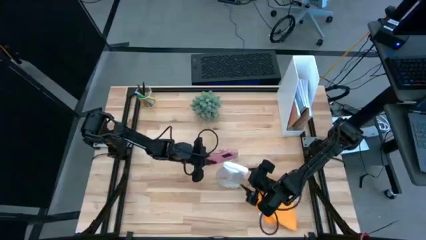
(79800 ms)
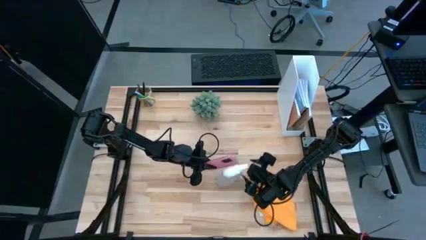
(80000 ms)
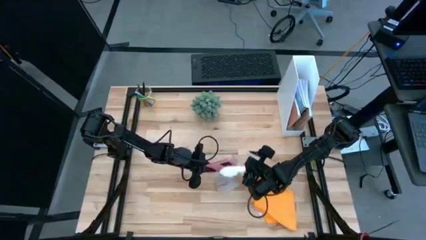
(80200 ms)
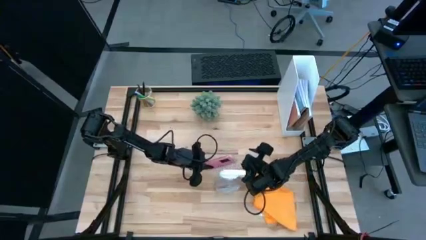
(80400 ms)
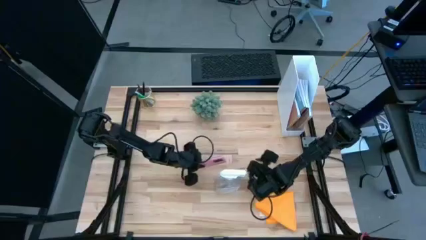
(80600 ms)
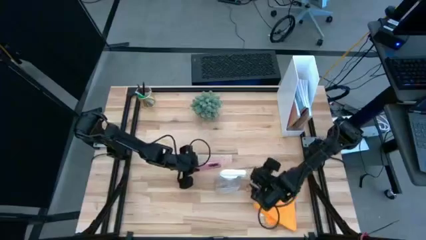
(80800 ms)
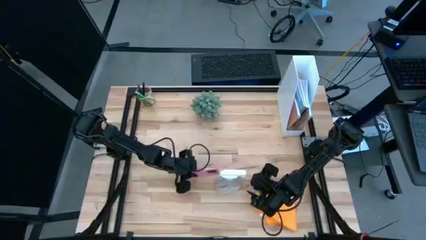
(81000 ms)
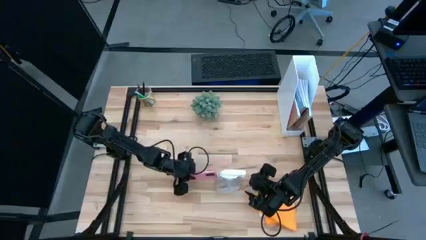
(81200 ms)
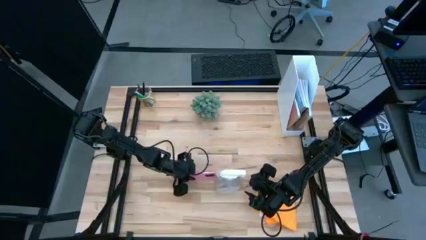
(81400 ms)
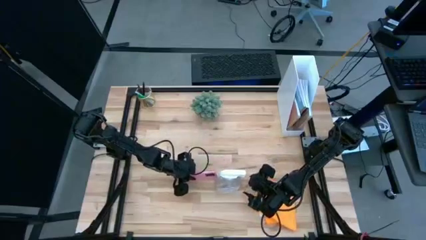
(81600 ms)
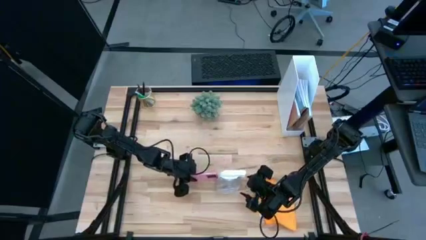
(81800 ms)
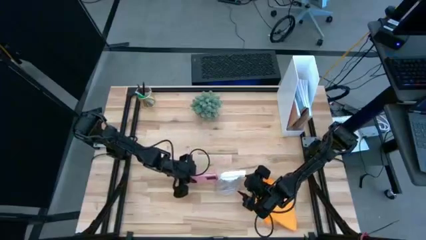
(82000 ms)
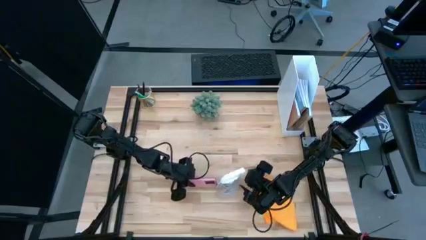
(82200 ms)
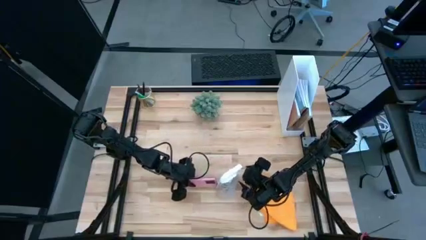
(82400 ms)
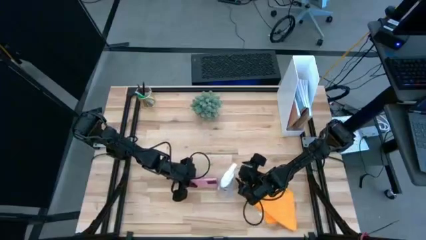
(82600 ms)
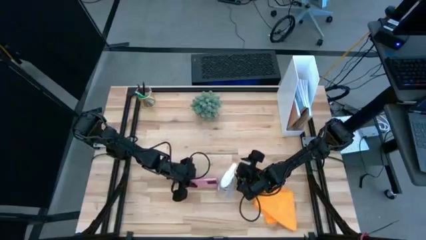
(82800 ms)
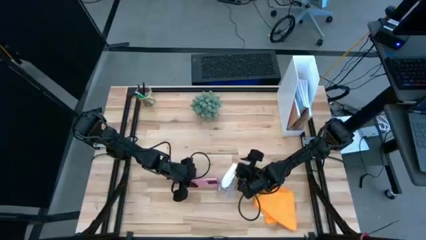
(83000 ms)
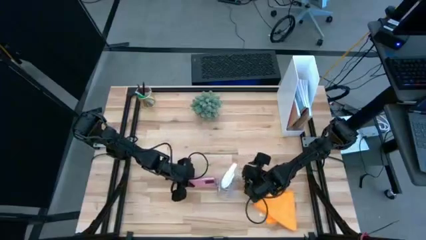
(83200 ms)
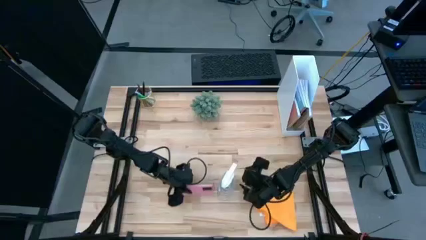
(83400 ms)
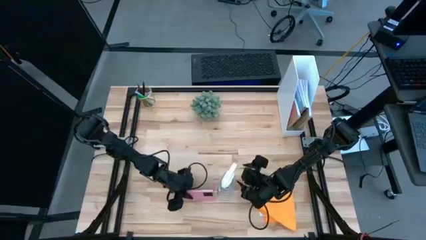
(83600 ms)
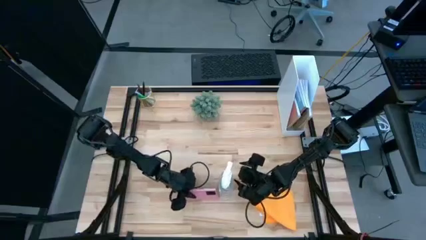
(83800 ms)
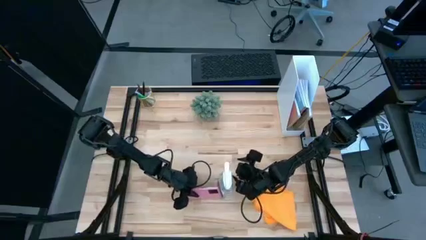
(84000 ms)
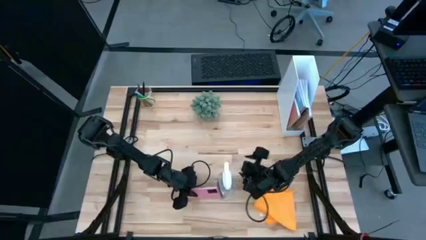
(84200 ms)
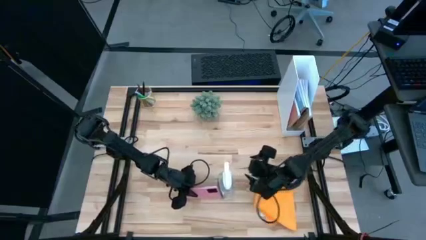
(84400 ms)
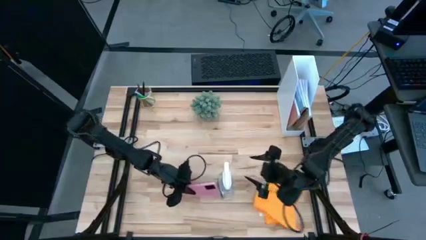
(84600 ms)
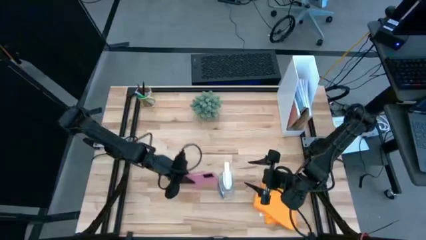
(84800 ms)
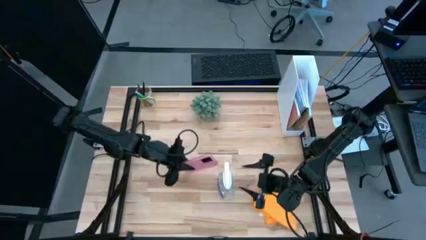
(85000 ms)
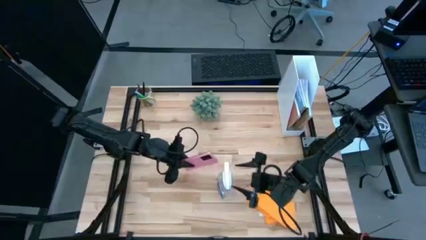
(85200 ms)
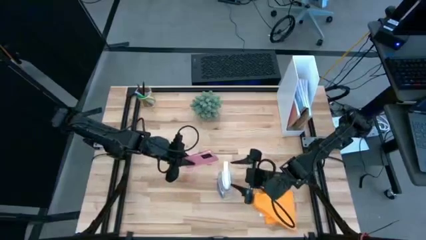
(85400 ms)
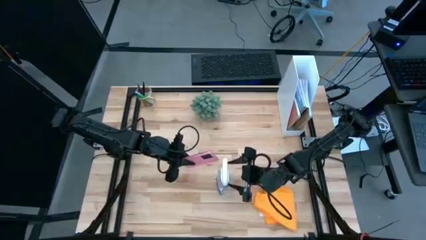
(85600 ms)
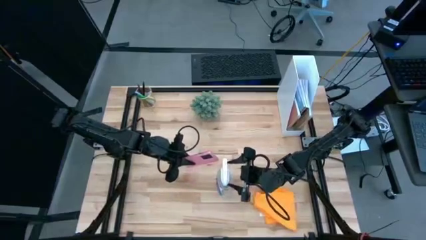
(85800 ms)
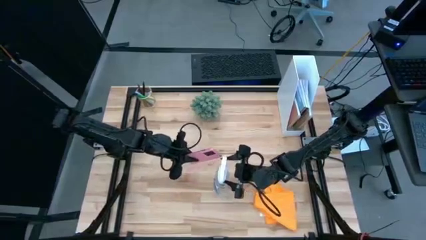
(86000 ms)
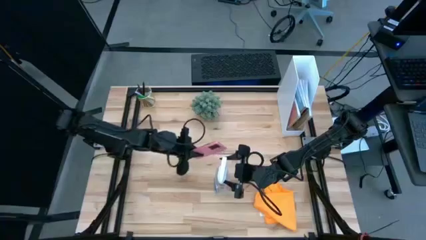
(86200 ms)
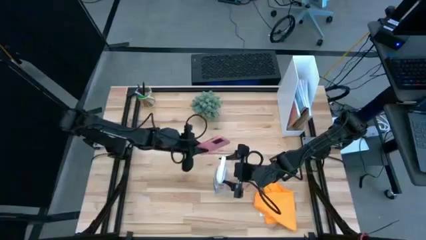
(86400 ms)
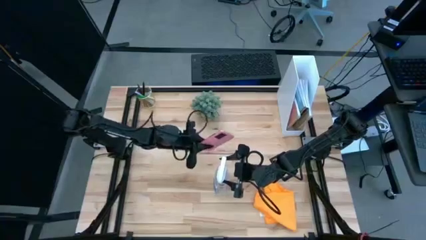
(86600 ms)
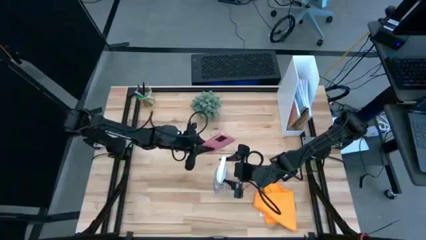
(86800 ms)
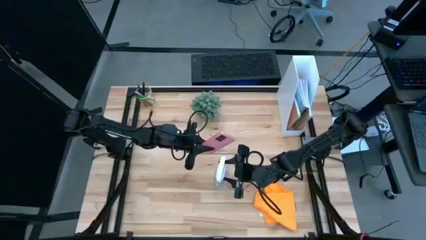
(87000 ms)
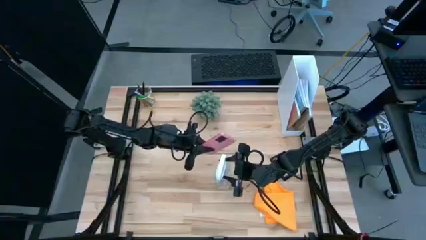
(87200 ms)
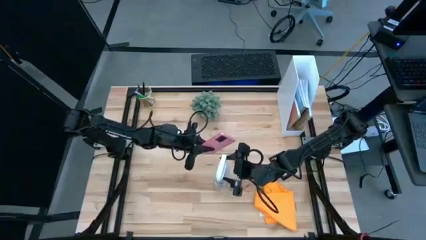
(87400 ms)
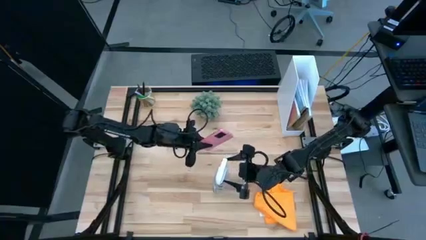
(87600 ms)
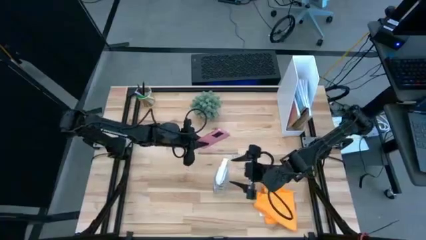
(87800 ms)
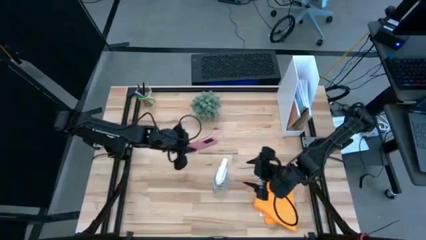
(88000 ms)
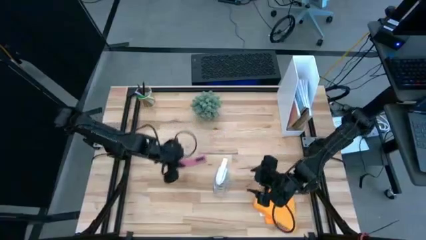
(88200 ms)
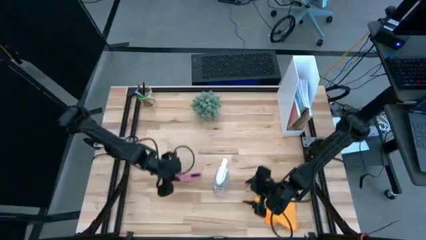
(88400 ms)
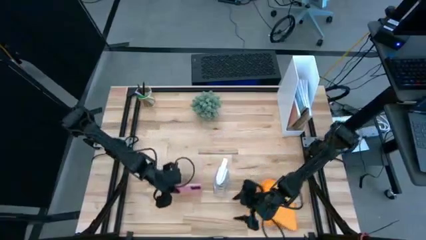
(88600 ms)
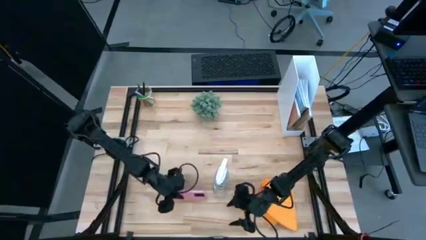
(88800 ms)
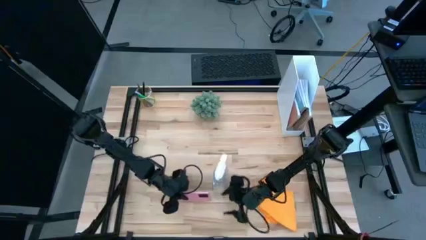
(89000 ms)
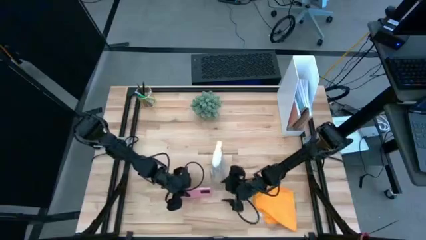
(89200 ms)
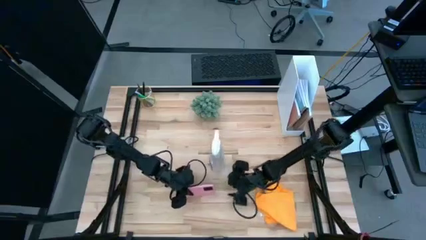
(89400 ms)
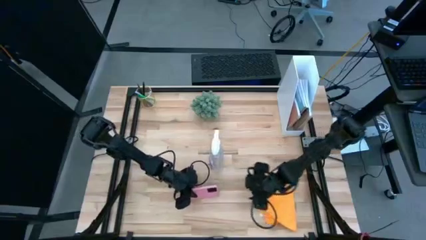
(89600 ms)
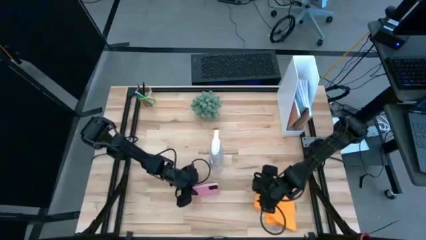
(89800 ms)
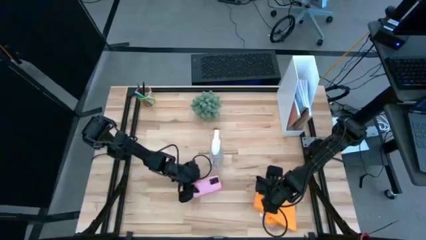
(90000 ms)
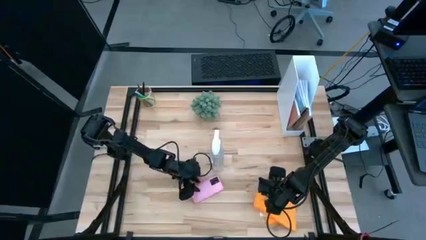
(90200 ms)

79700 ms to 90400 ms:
Task: Apply microfiber cloth
Spray the back of the cellphone using the spray bottle

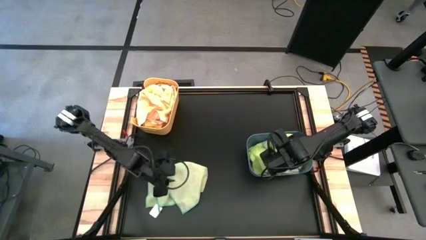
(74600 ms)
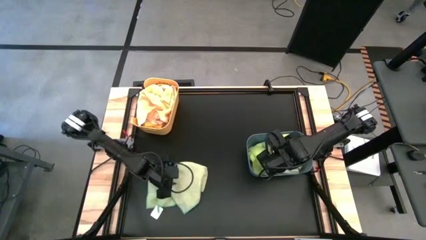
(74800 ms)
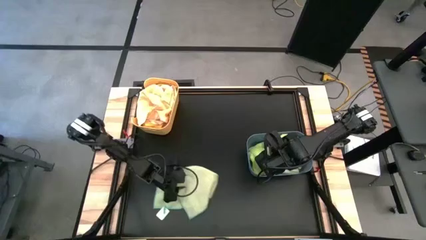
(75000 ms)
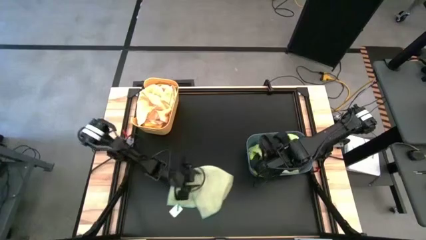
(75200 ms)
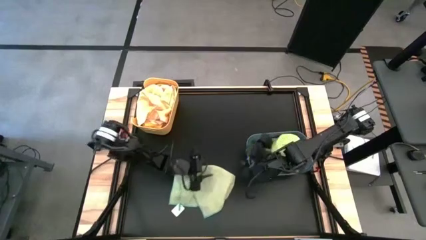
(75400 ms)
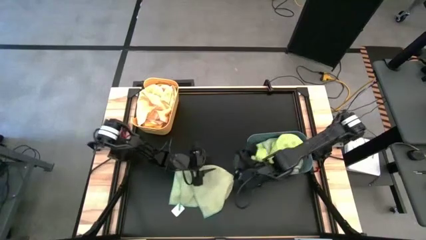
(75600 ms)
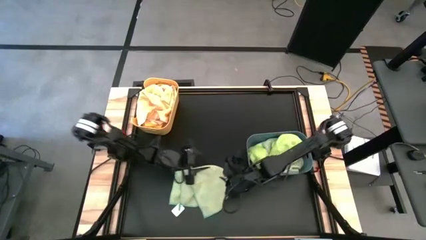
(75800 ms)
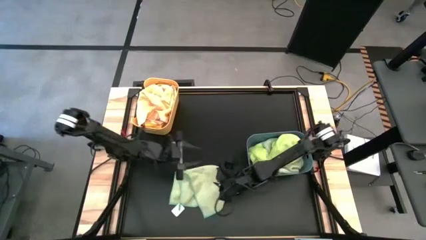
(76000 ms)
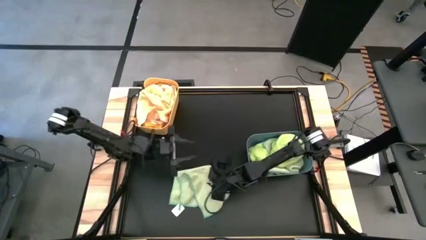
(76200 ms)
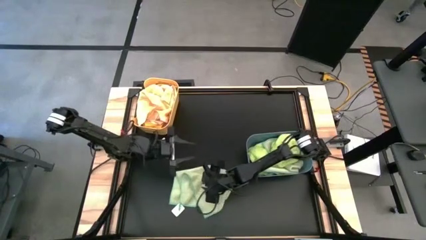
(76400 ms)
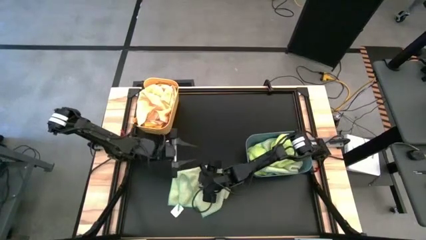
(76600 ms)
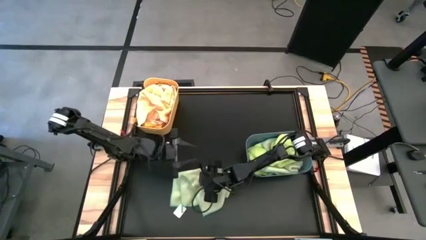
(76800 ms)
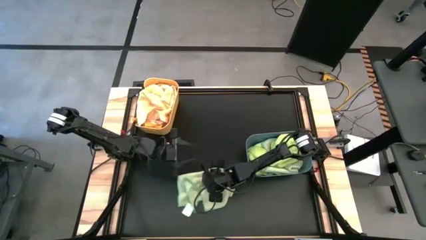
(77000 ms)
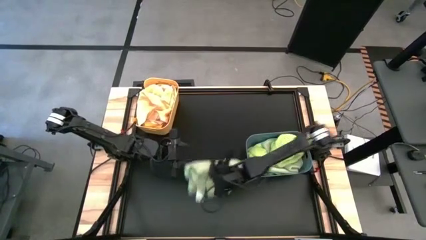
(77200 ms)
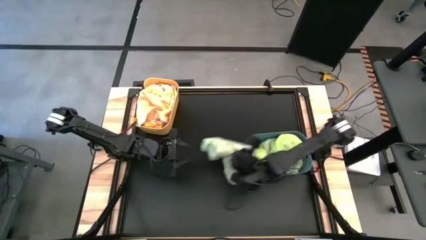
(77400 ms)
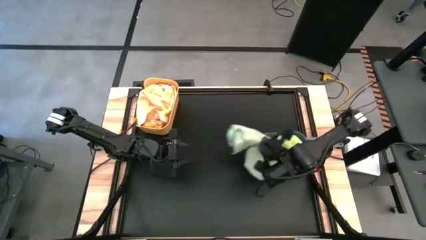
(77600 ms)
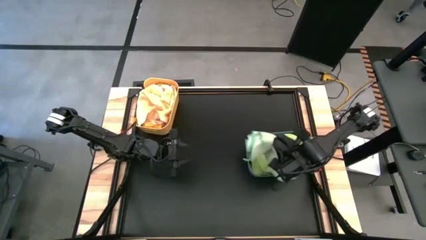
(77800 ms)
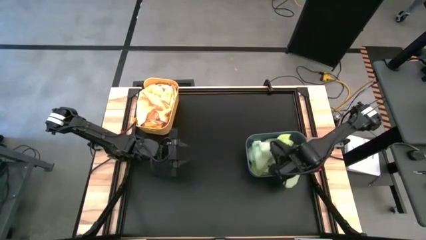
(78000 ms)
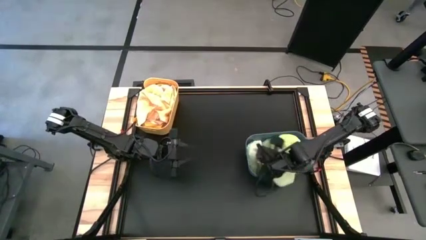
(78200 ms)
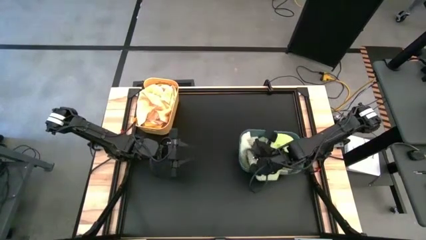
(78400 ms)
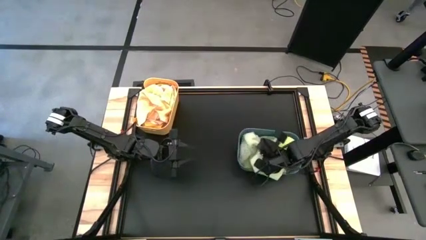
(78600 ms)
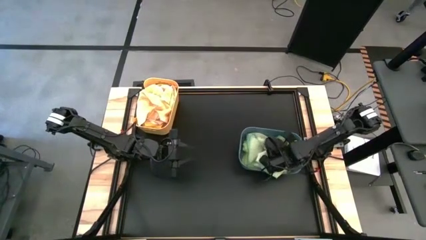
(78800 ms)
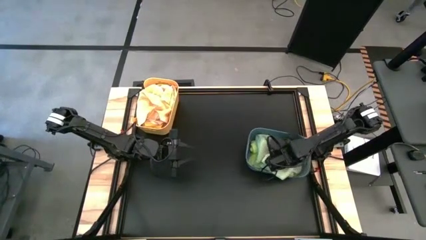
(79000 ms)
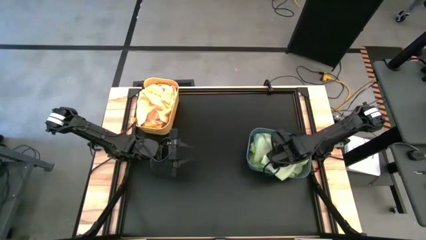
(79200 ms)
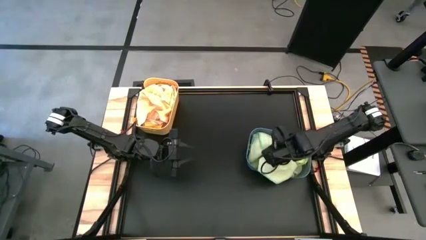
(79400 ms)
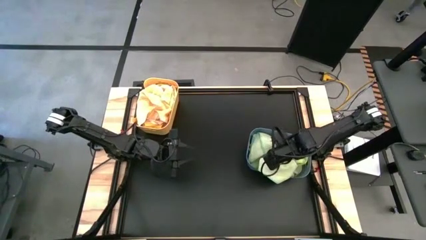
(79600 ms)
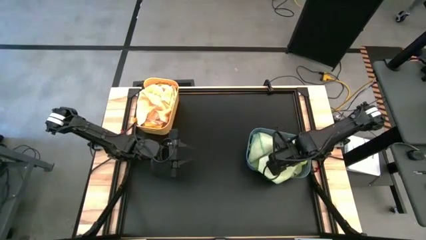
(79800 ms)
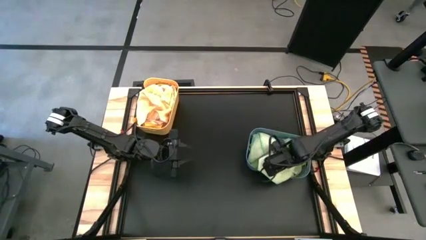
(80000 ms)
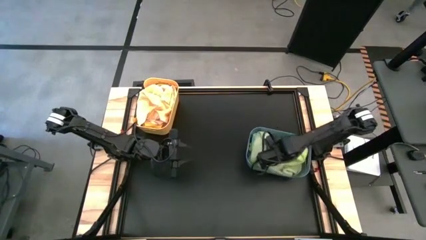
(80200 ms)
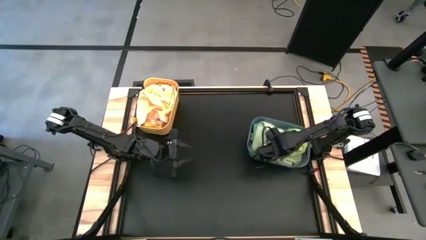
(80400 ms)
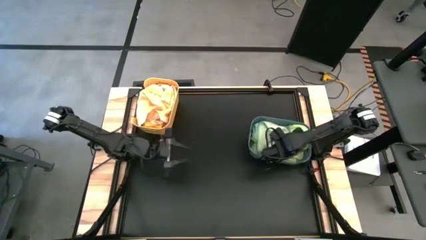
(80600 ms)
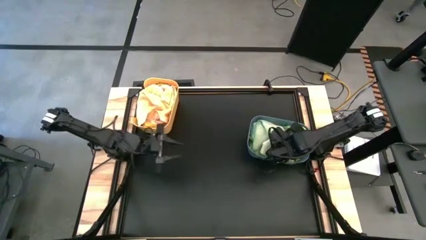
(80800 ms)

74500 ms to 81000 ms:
Task: Sort towels by color in basket
Put the light green microfiber cloth into the blue bin
